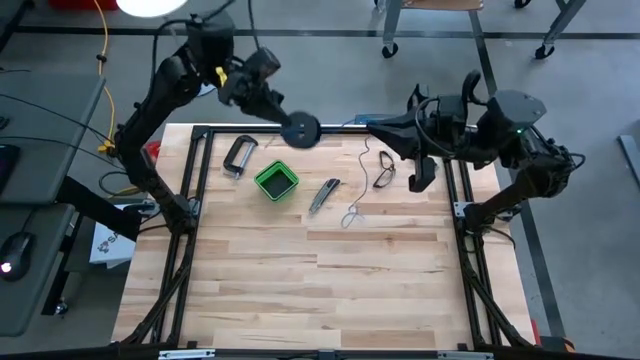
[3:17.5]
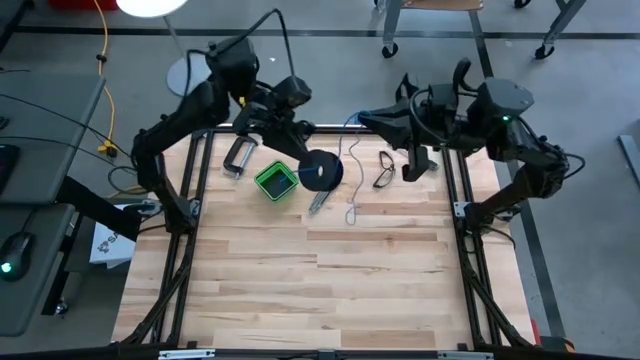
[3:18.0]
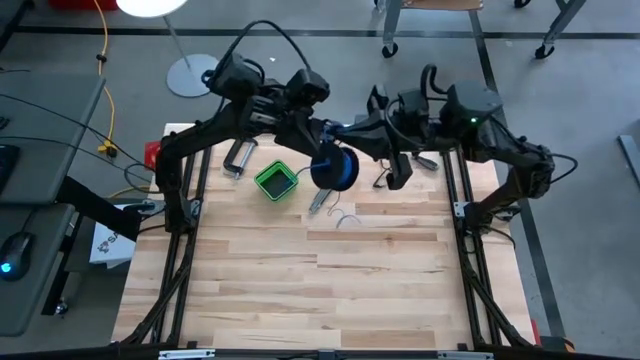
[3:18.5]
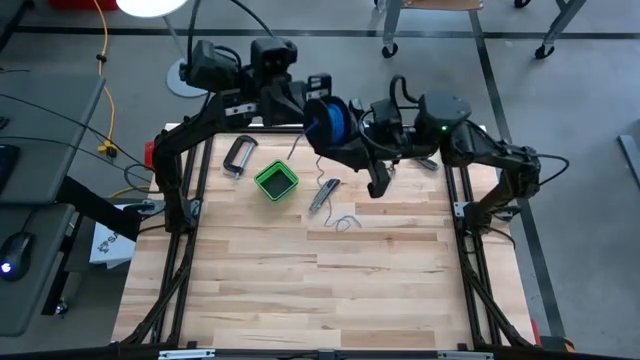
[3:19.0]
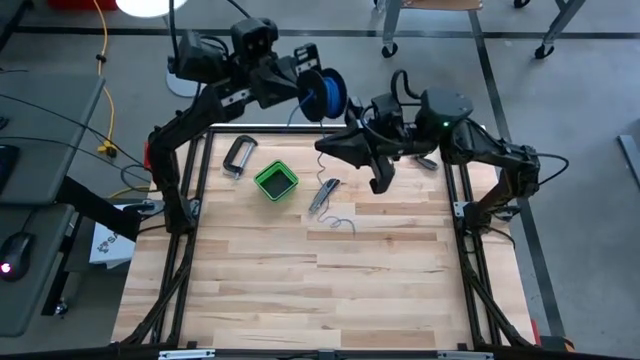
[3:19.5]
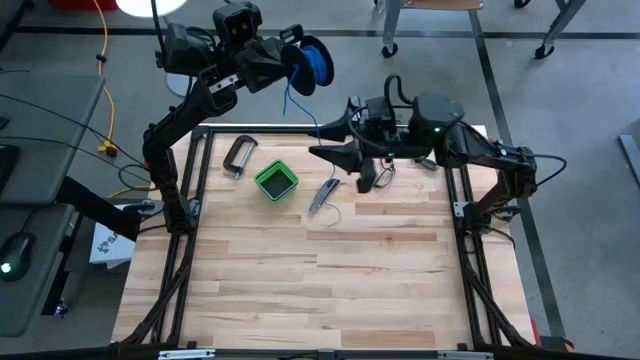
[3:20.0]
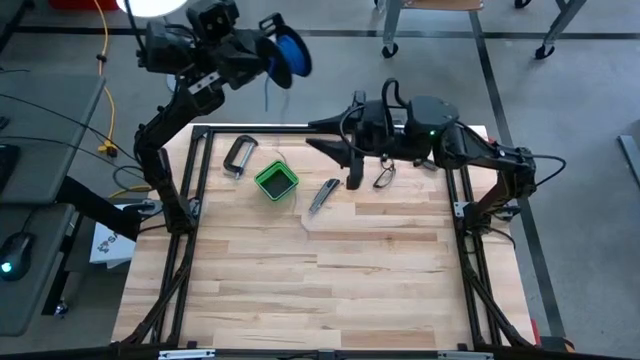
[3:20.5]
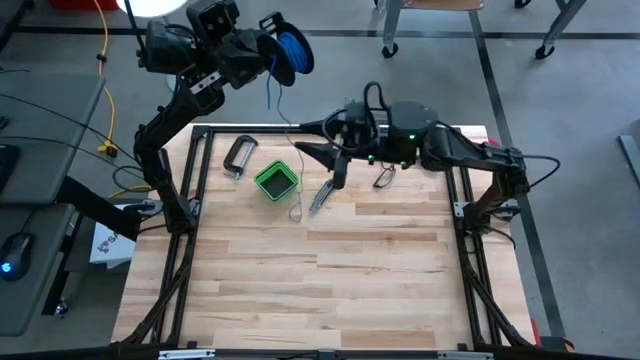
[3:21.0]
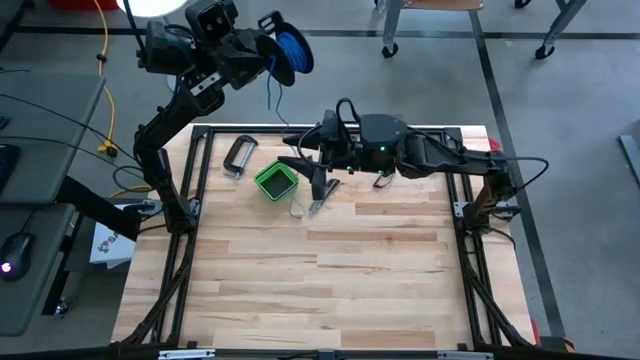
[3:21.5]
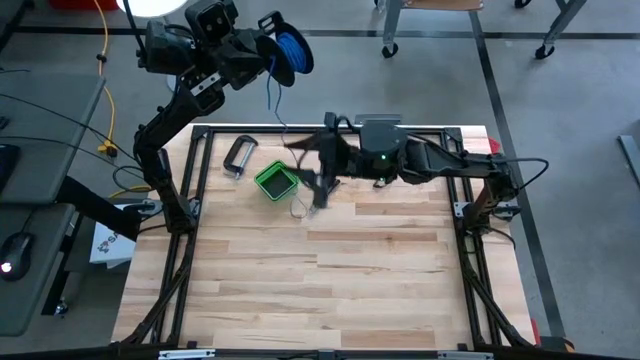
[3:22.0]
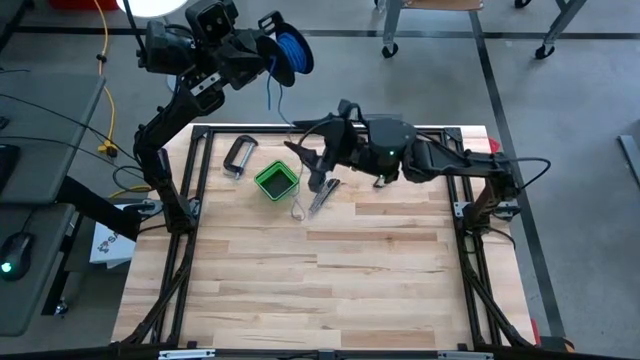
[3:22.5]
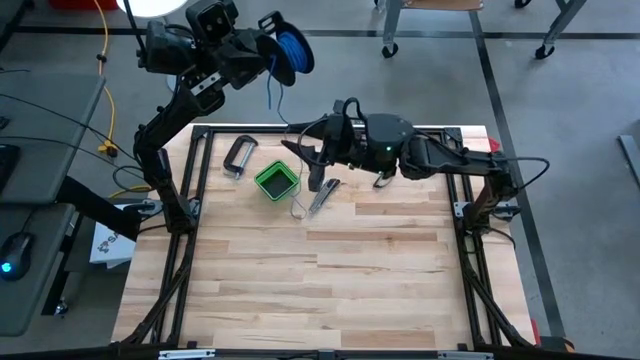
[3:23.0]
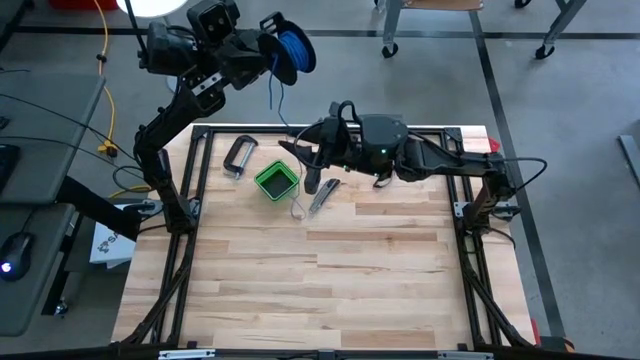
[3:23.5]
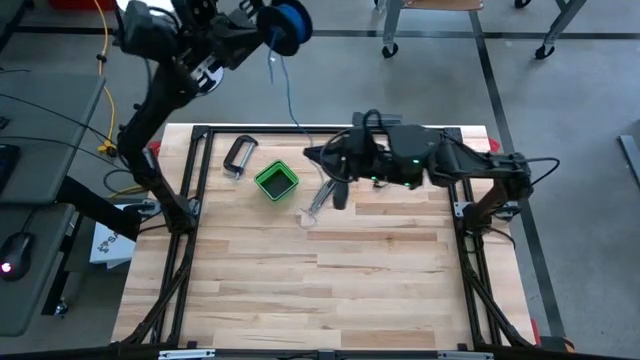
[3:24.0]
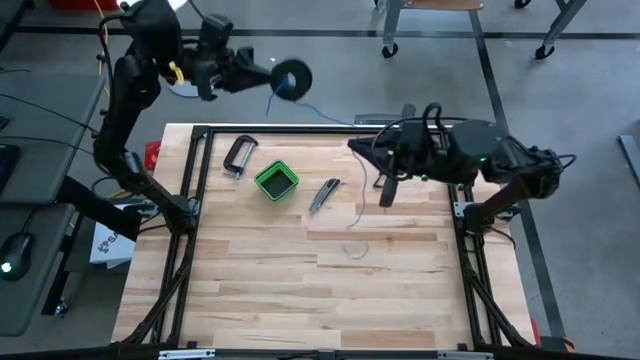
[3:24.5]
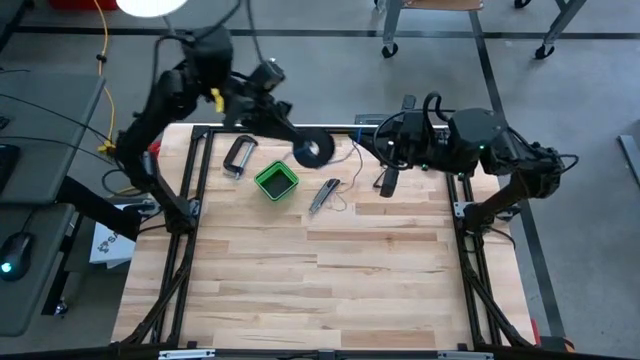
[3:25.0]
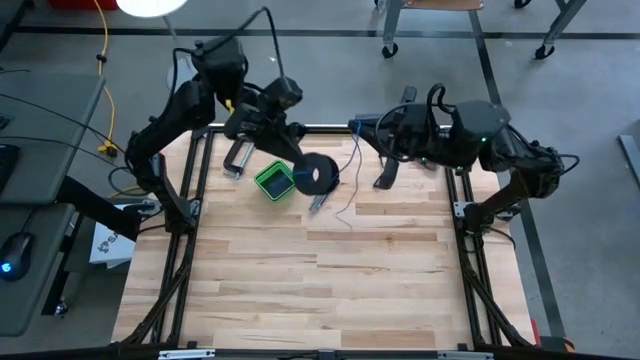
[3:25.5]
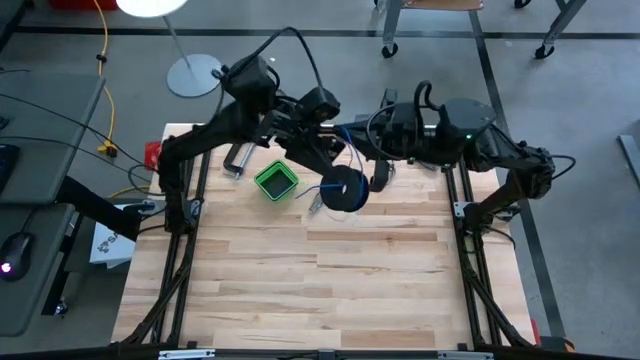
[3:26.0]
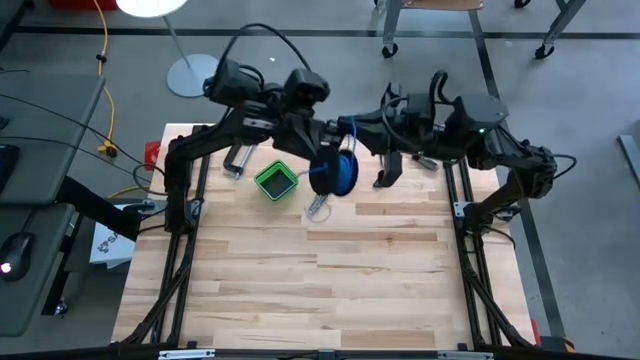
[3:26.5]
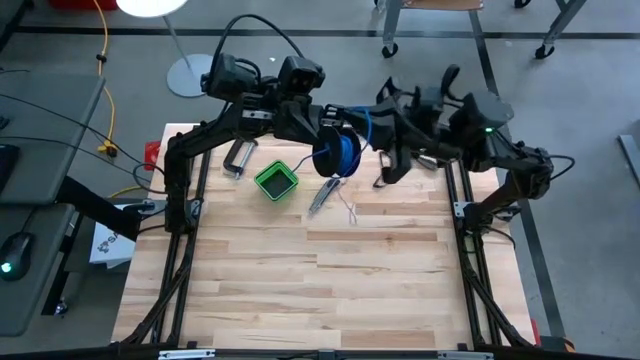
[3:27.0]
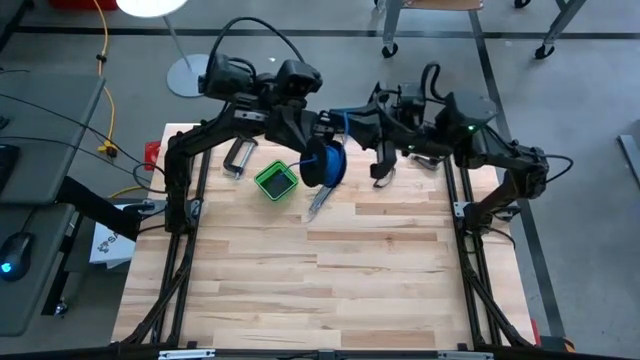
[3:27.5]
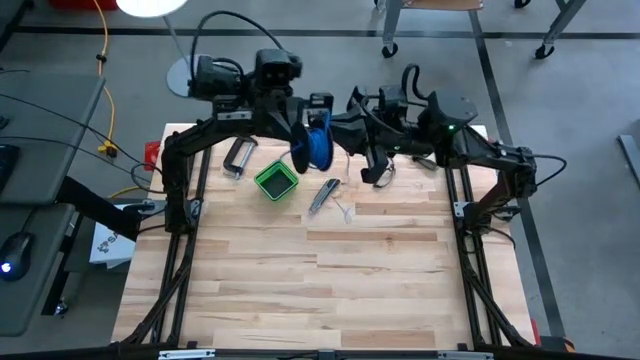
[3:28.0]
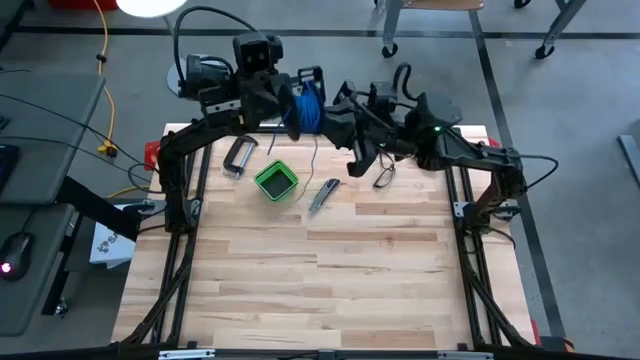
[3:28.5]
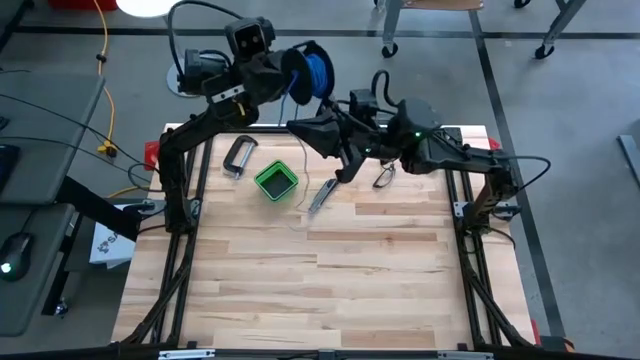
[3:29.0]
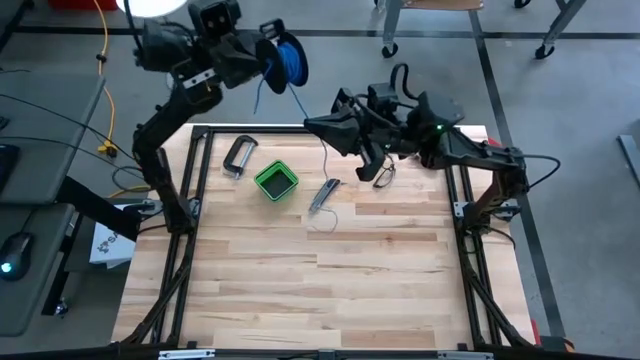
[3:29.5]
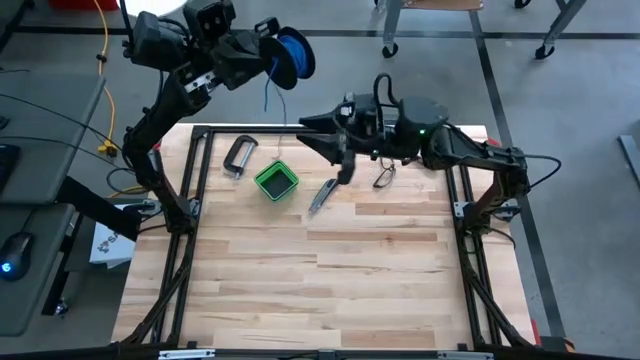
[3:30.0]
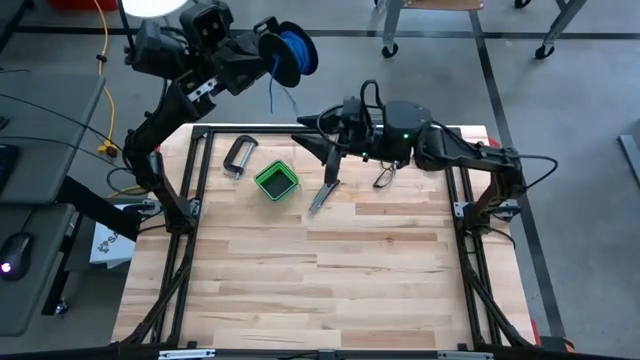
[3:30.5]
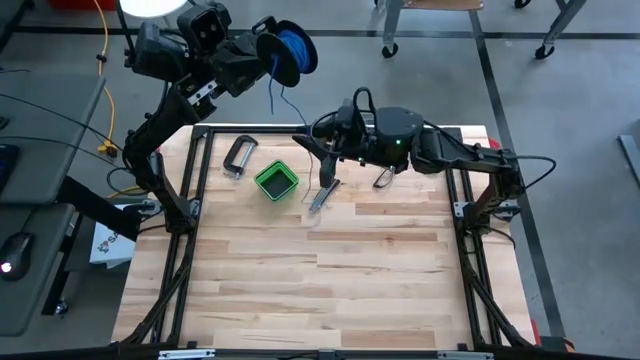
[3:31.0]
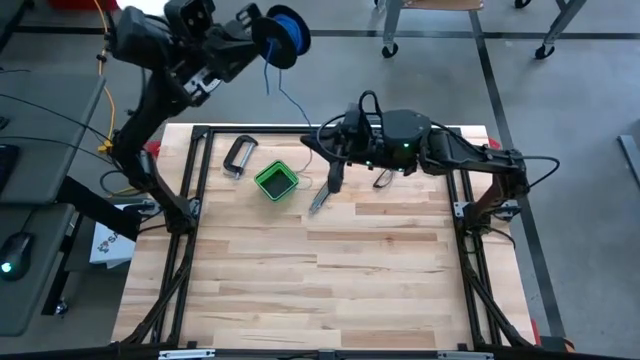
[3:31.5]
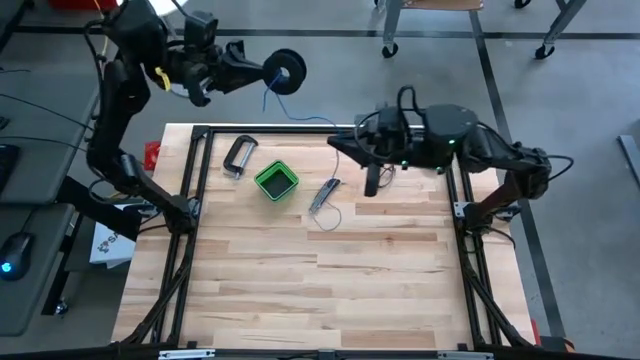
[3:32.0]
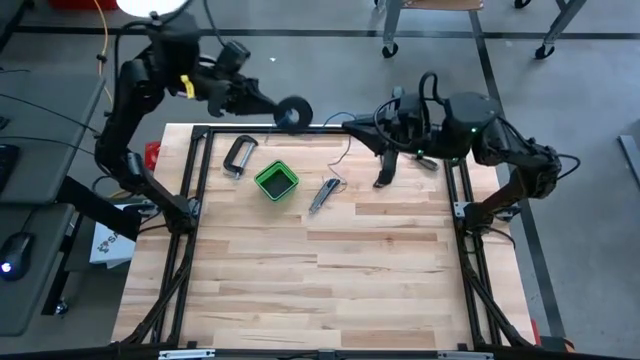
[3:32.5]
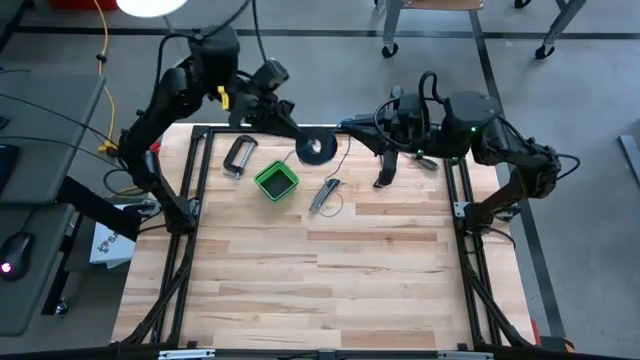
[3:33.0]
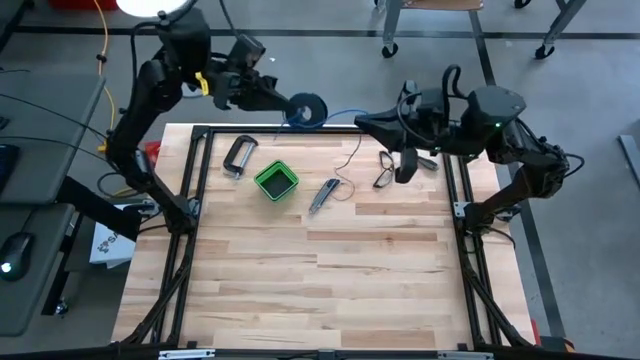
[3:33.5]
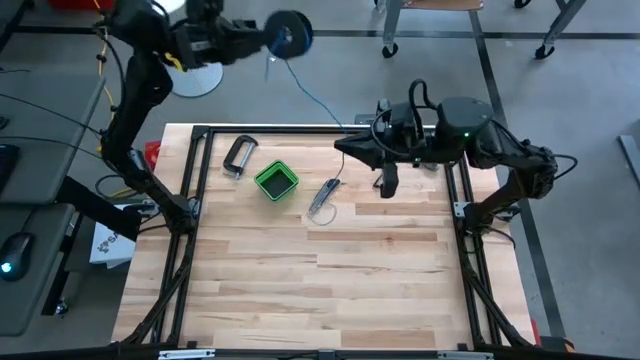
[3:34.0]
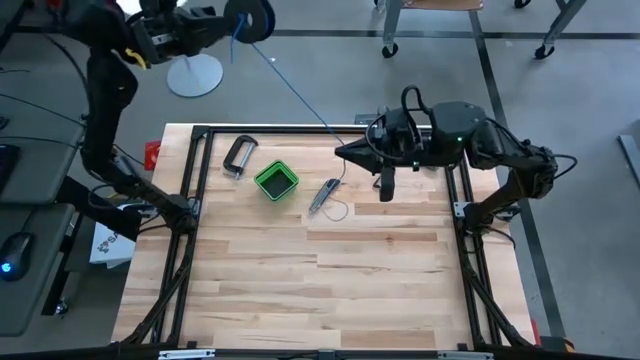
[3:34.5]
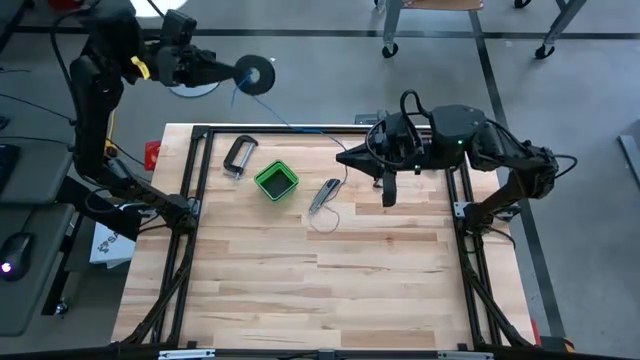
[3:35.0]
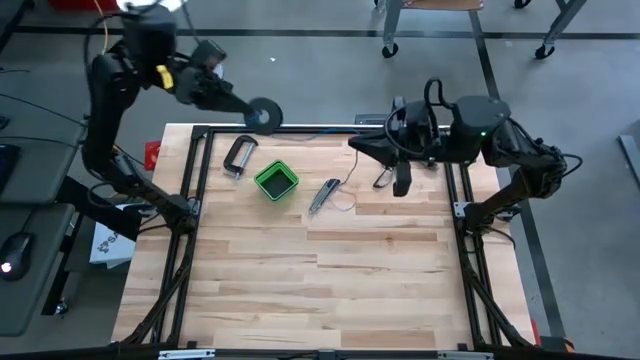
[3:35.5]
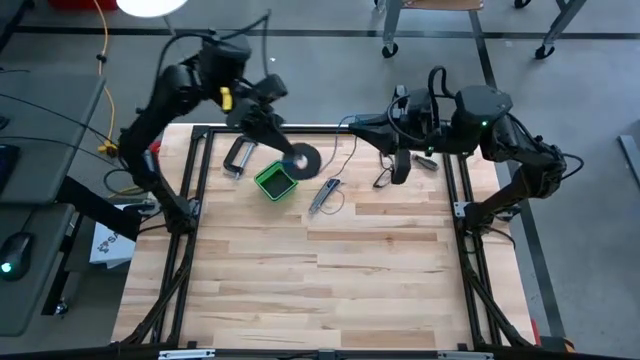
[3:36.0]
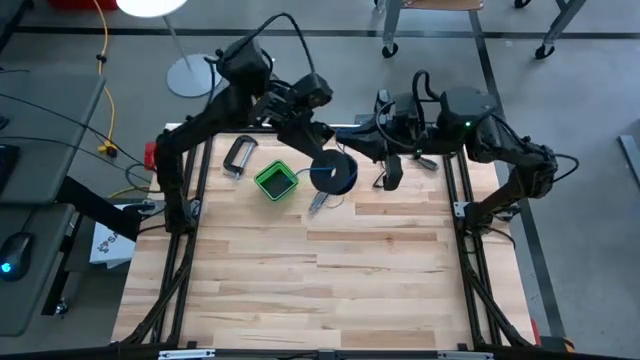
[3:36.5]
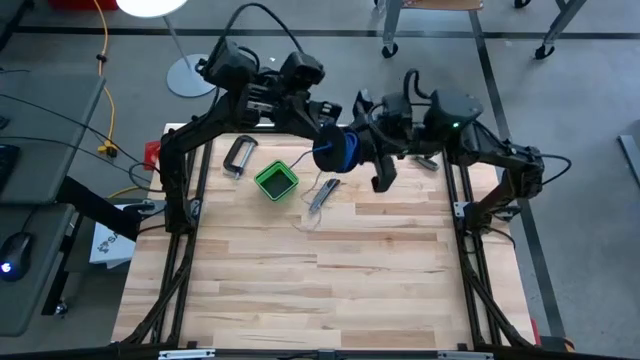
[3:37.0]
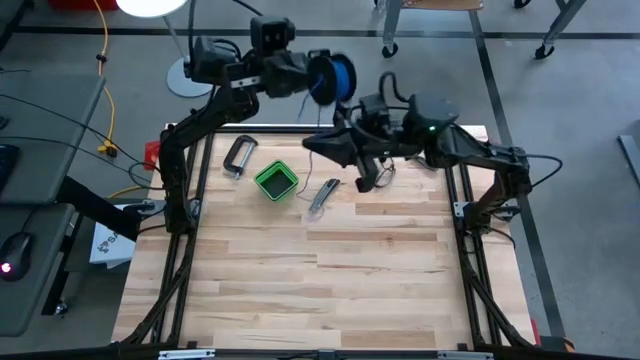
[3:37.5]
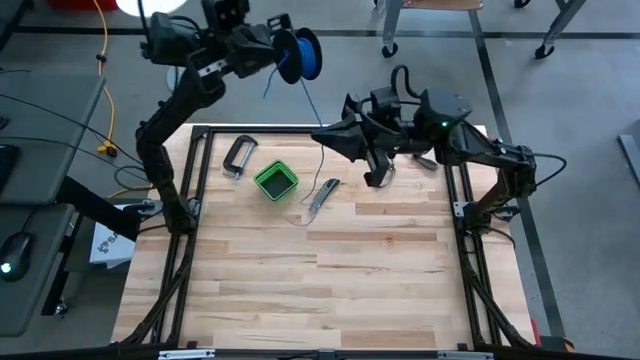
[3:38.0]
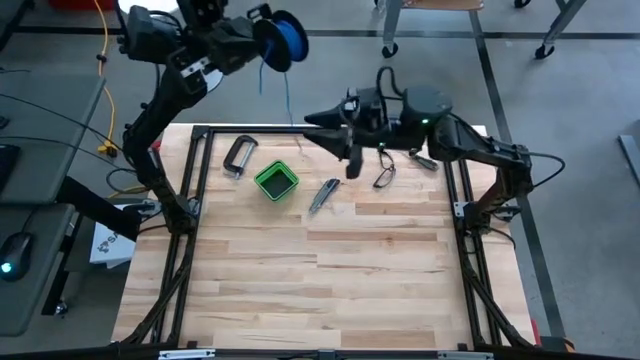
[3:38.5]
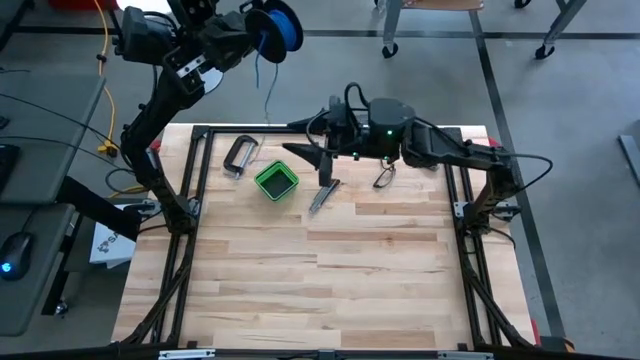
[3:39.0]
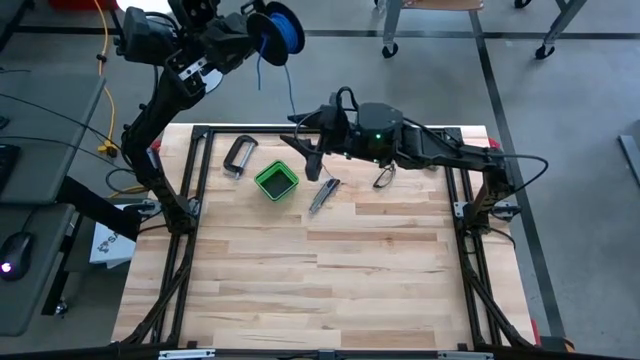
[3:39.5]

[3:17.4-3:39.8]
Task: Coil cords
Coil the blue wire onto the spool
